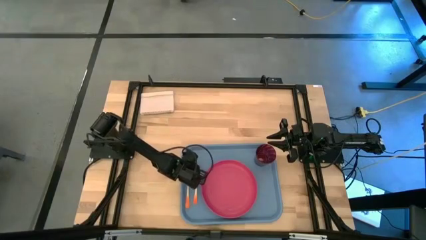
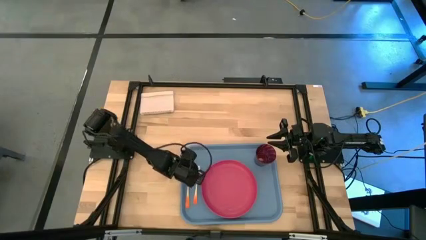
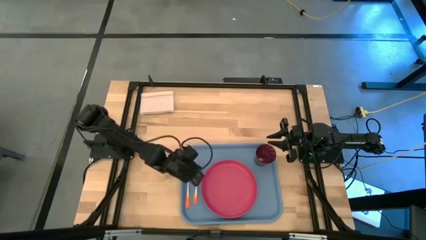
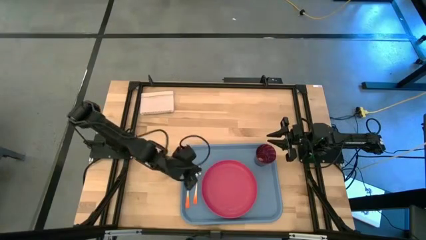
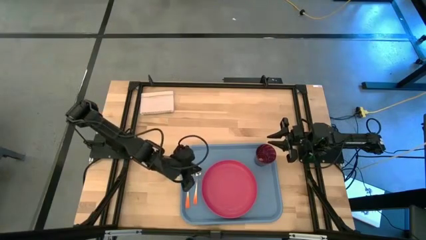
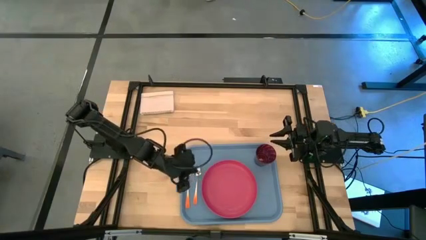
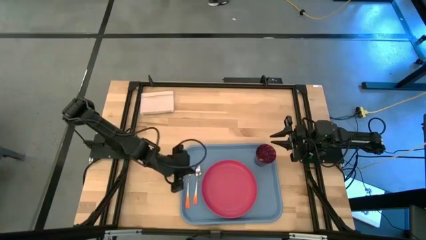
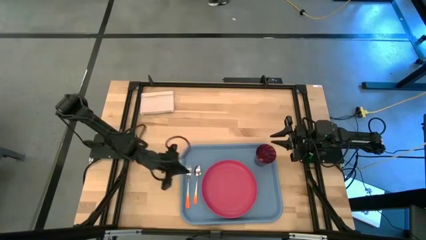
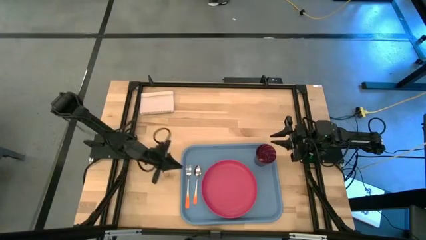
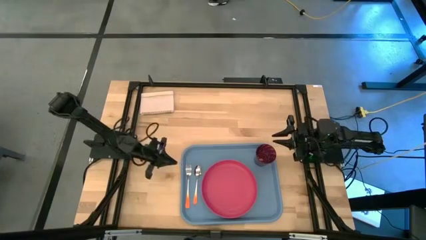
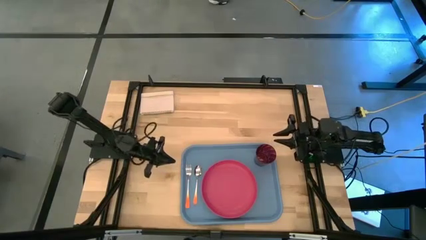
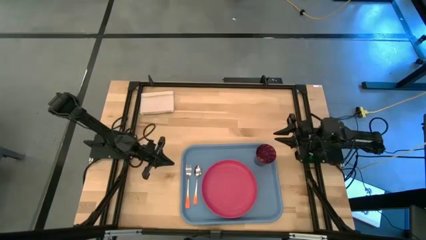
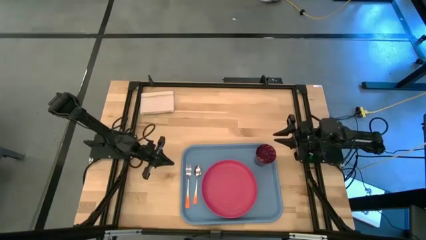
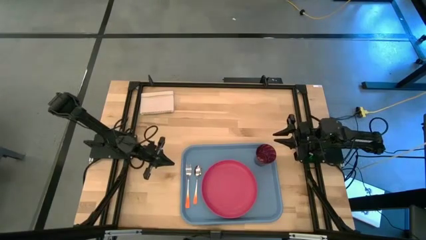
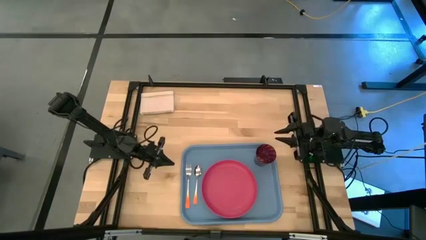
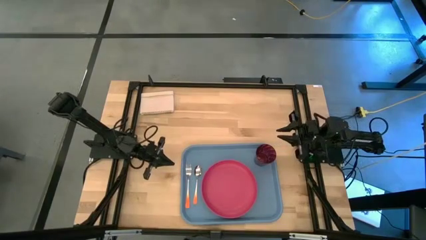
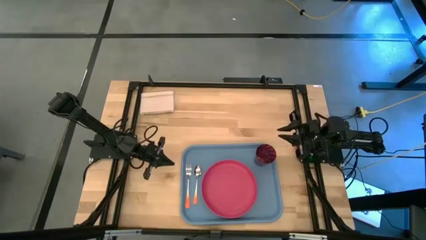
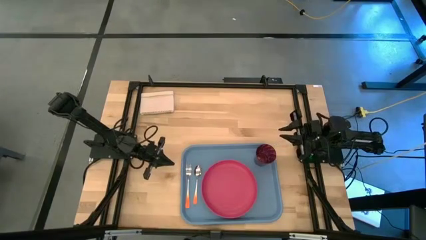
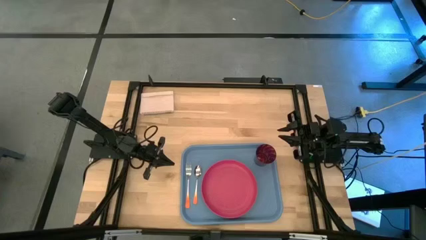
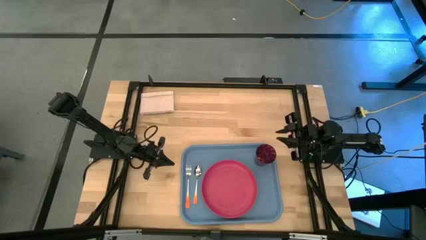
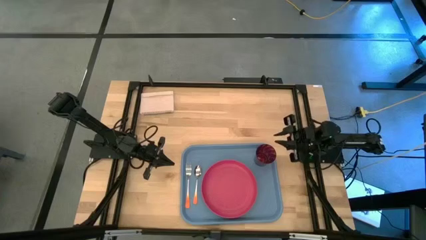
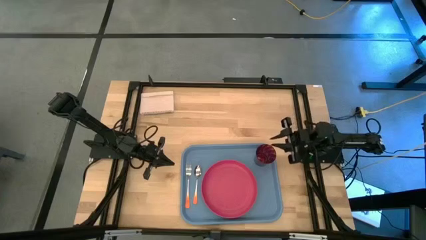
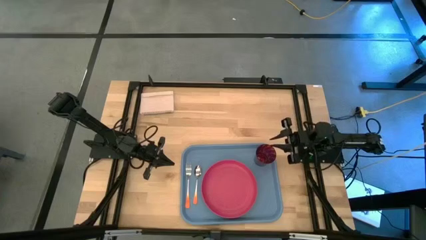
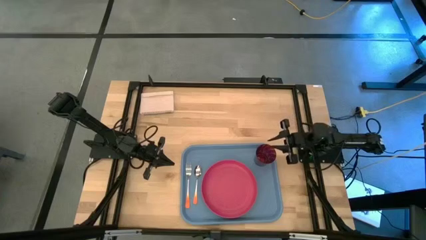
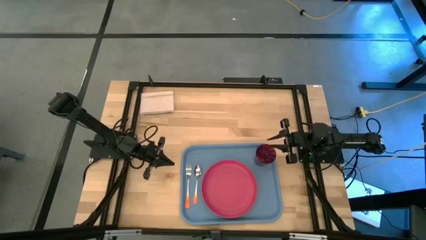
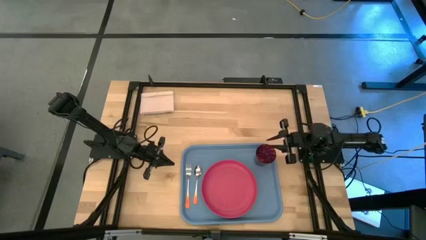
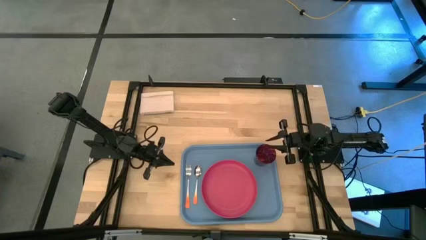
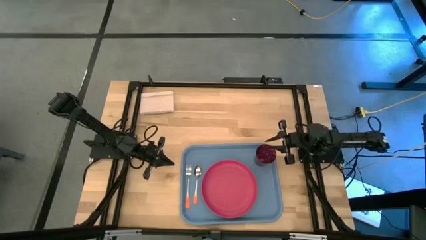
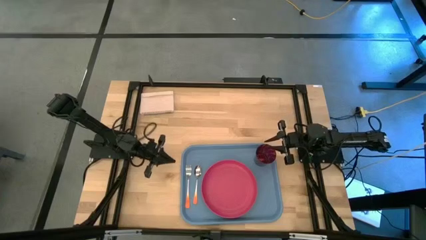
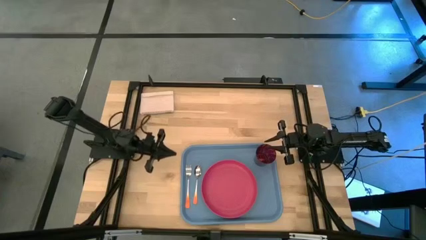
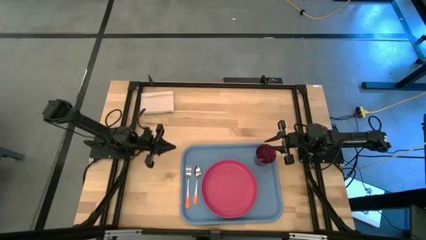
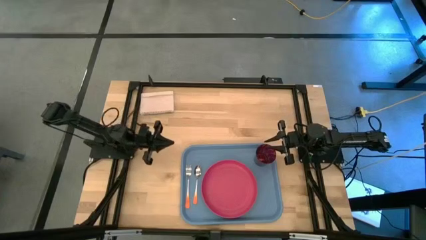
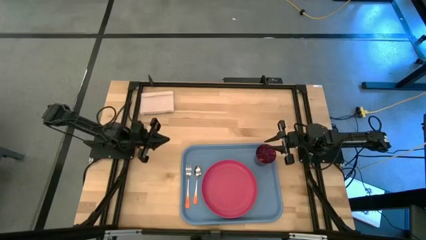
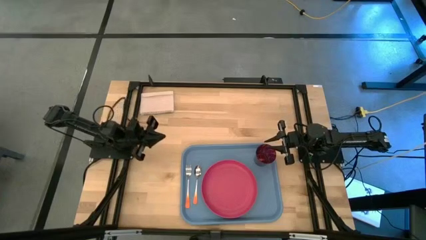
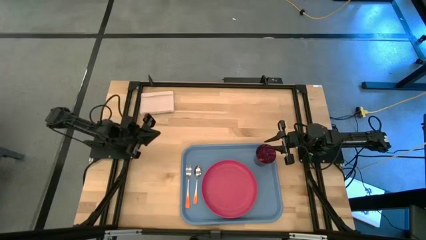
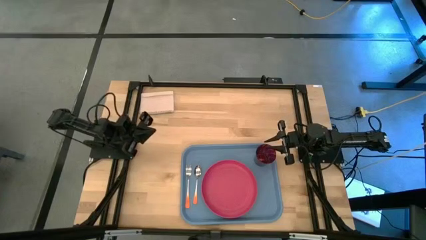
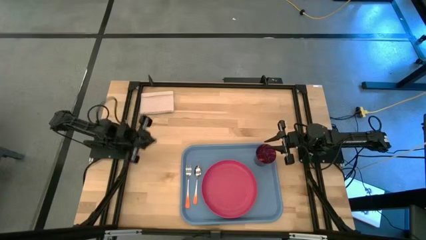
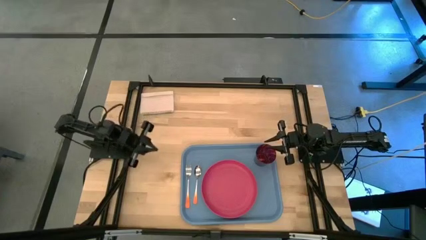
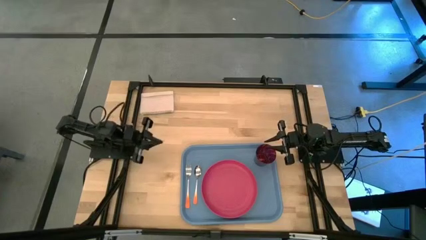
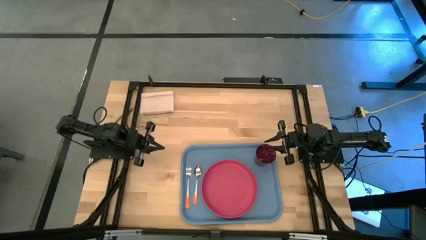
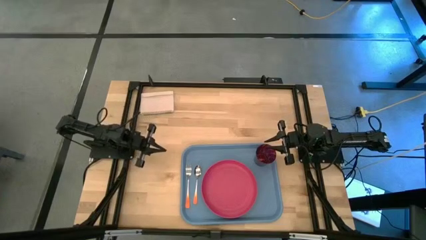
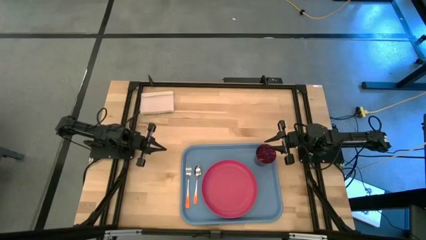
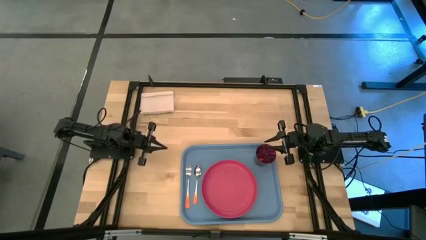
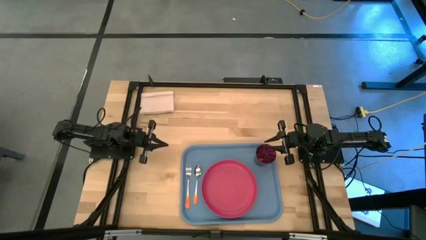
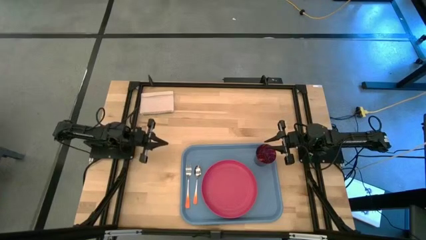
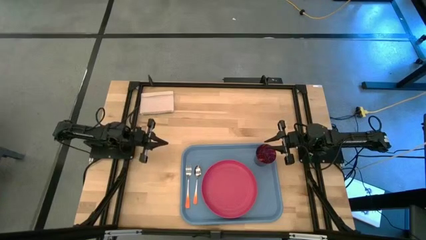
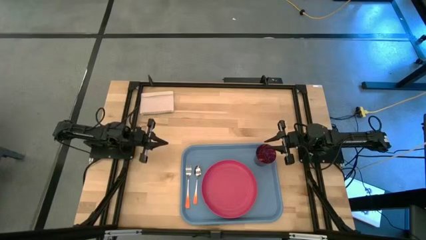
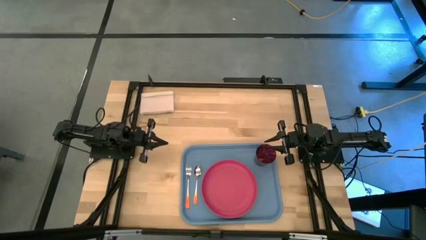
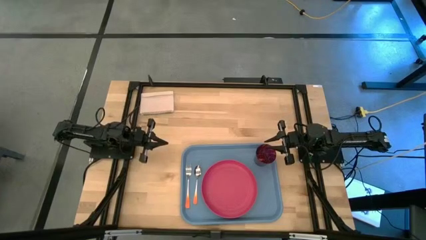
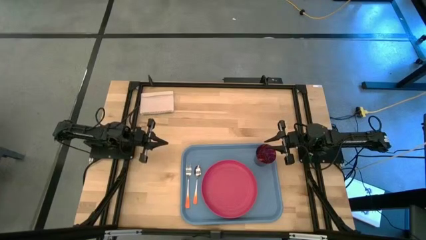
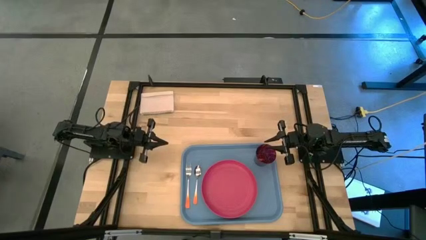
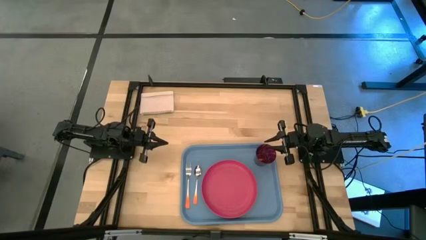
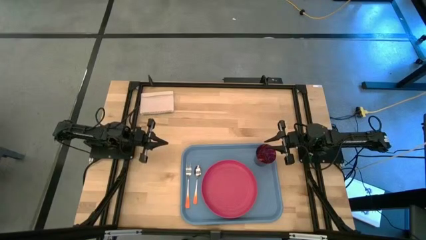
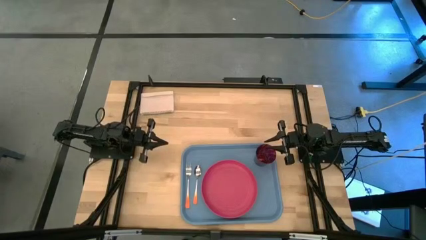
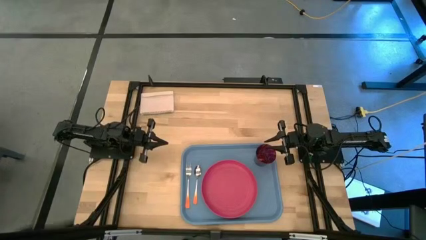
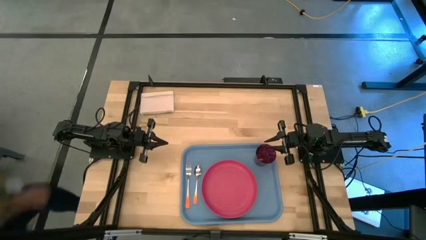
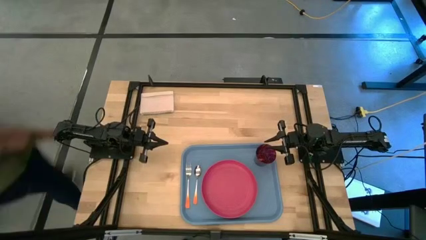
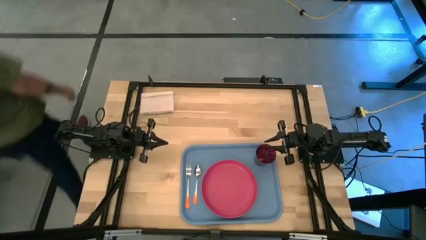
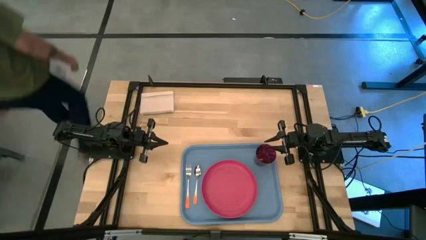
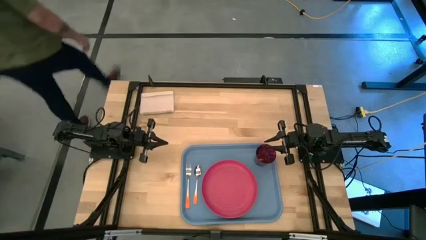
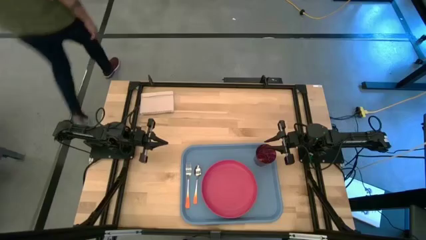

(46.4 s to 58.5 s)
Task: Pick and place plate/cup/fork/spoon on tray
Return to Home Position

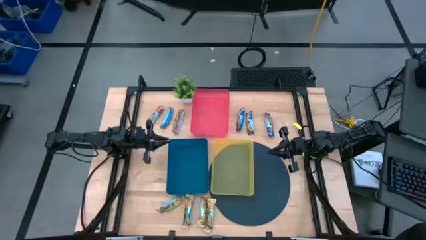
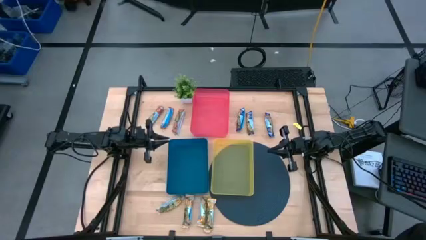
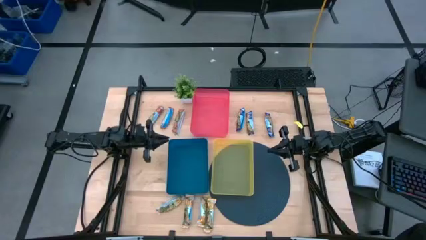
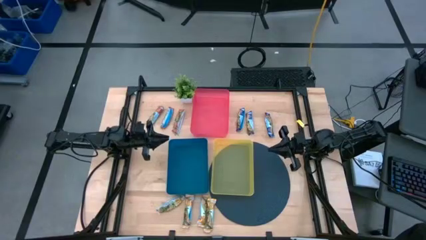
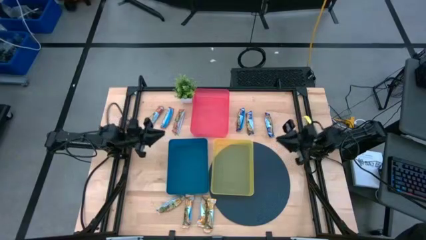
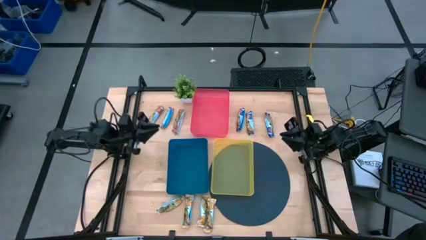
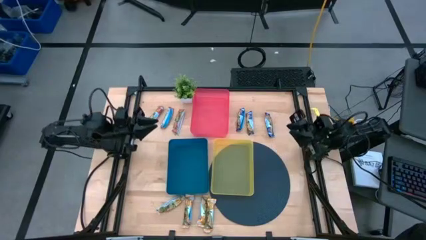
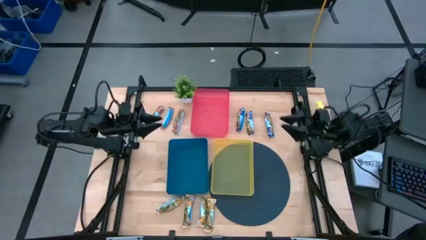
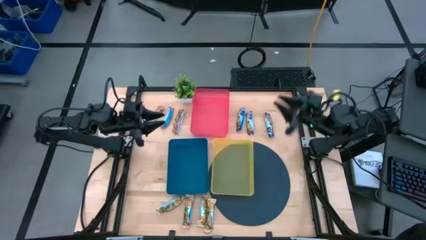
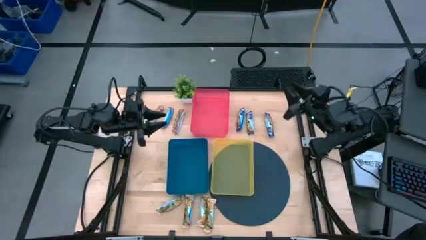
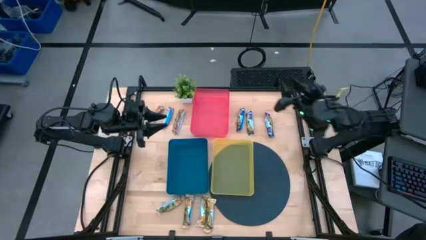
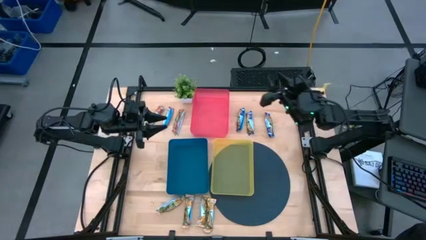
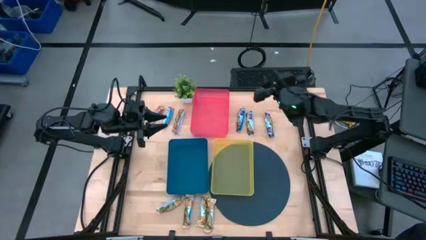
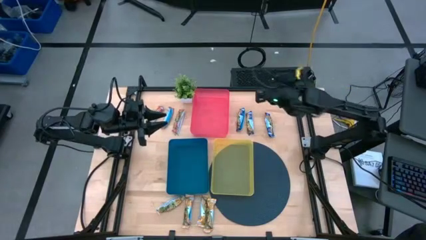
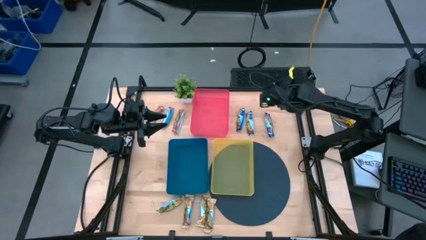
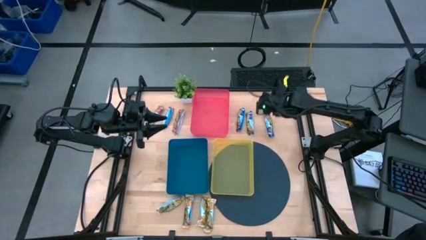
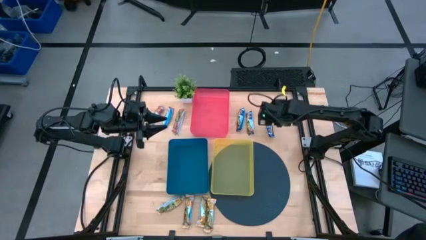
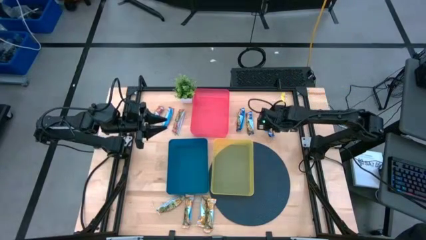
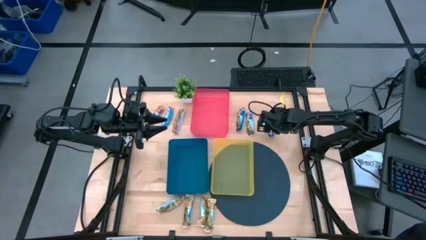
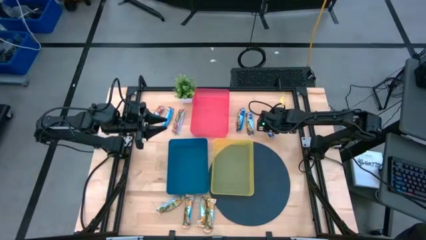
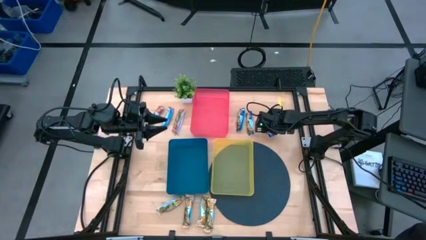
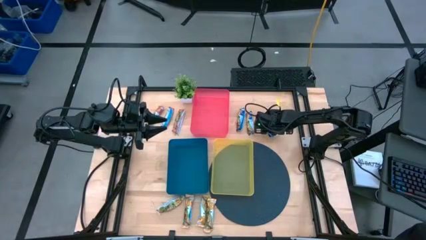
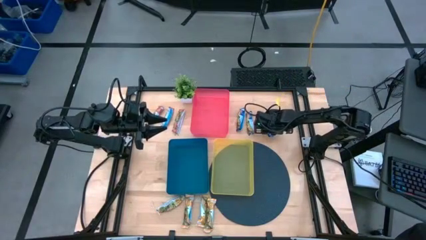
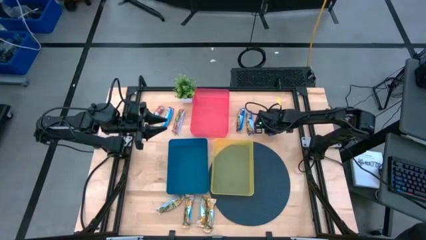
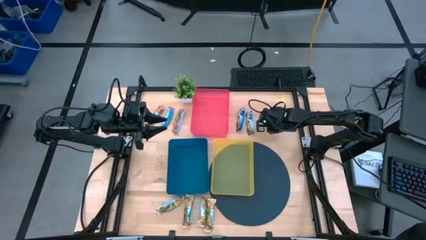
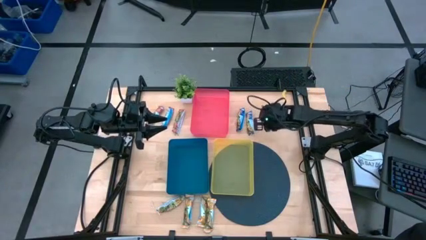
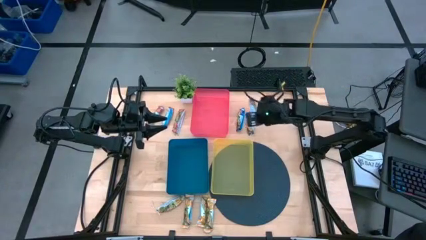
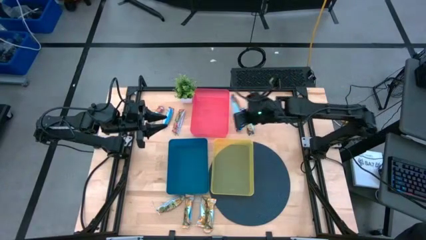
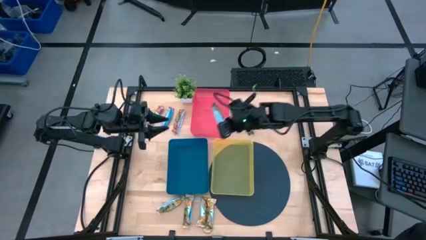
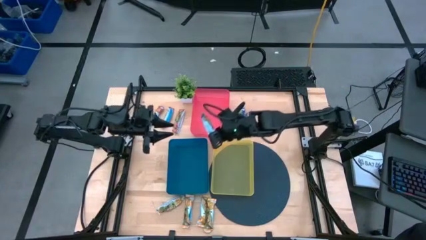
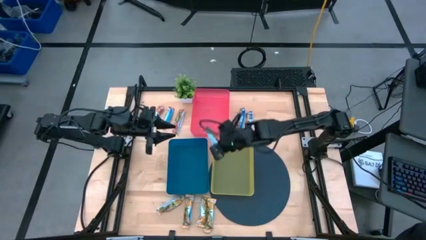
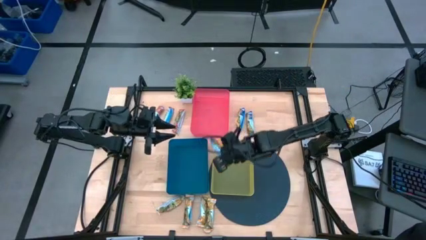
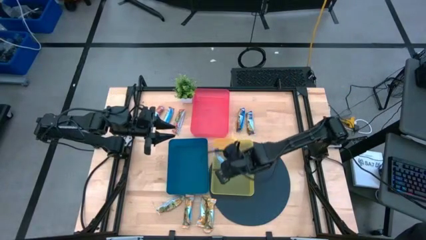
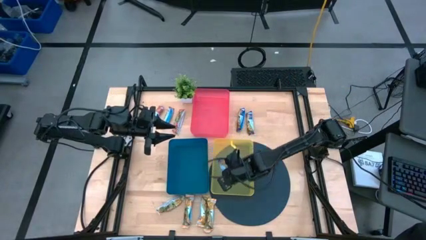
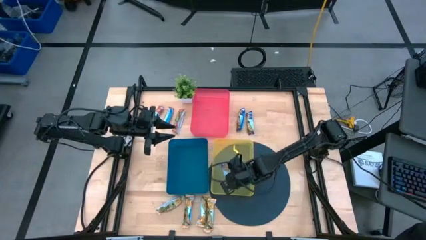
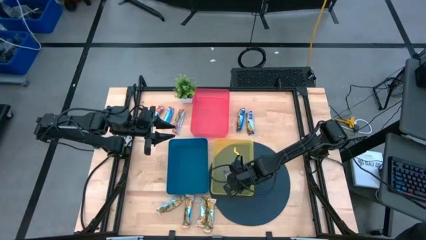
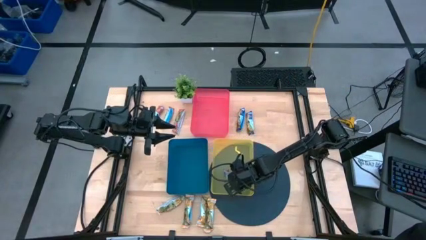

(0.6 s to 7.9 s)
Task: Pick and place Granola Bars by type
Put the right blue granola bar into the yellow bin
